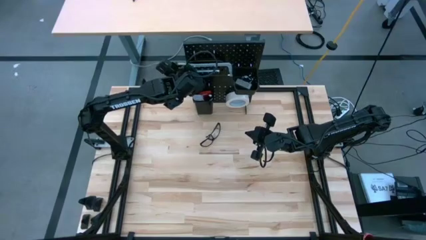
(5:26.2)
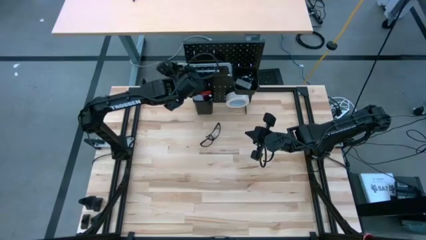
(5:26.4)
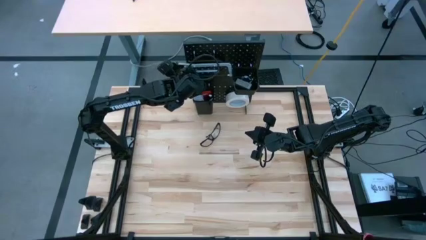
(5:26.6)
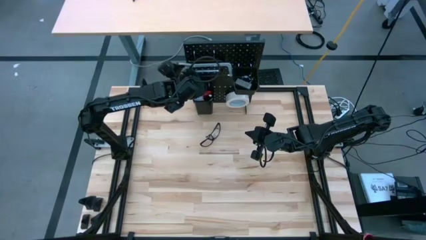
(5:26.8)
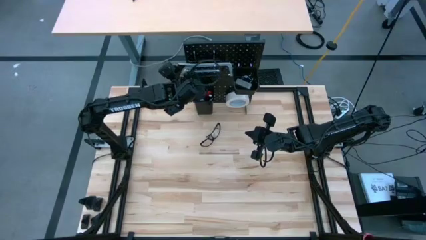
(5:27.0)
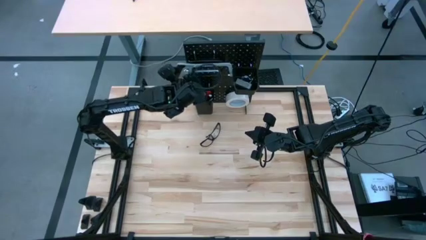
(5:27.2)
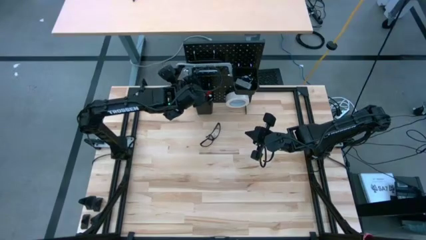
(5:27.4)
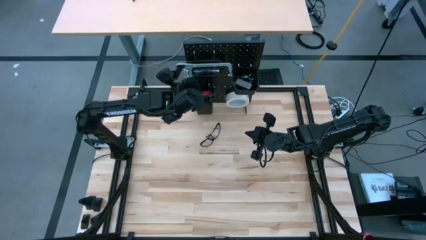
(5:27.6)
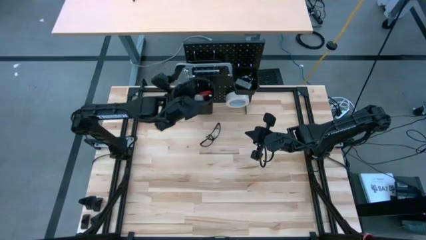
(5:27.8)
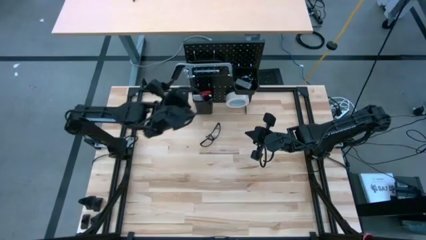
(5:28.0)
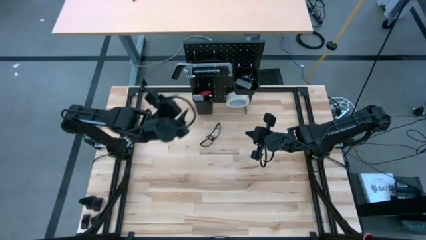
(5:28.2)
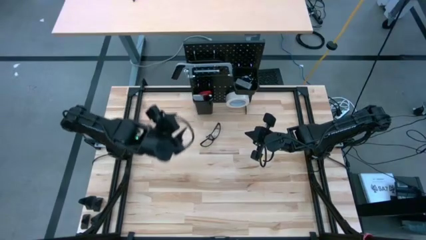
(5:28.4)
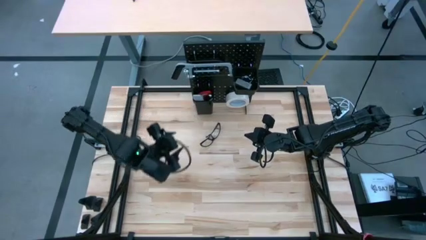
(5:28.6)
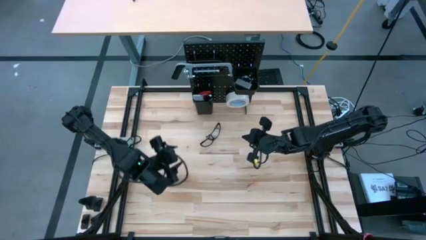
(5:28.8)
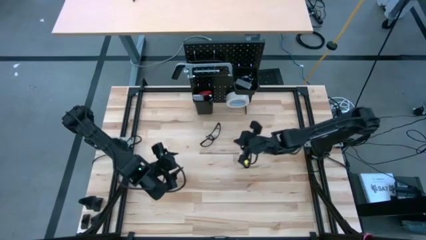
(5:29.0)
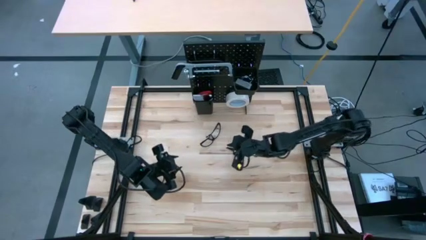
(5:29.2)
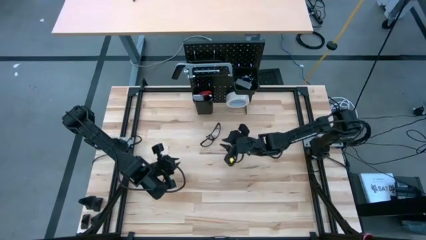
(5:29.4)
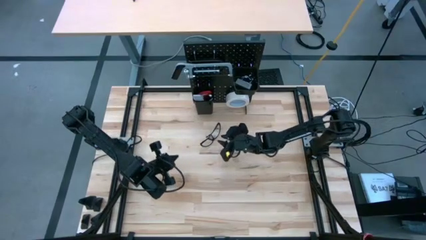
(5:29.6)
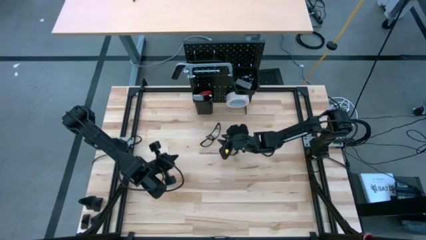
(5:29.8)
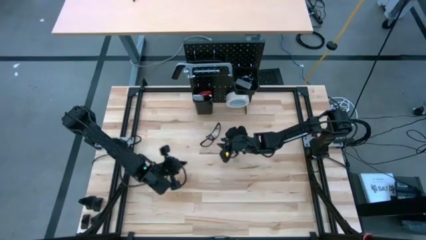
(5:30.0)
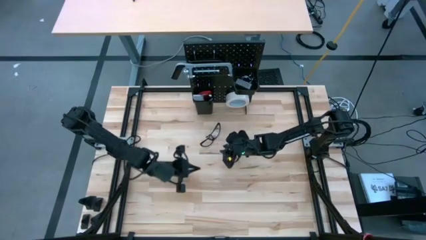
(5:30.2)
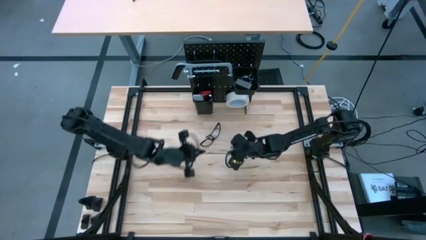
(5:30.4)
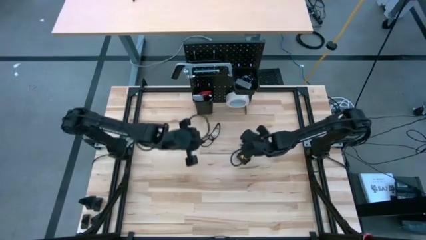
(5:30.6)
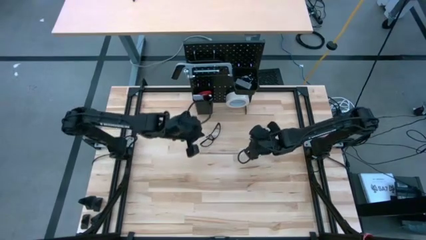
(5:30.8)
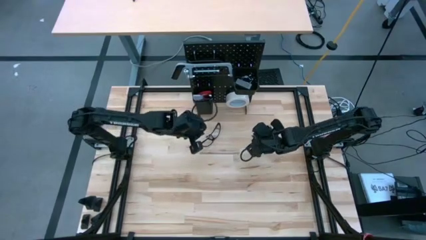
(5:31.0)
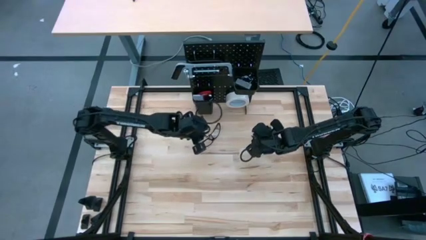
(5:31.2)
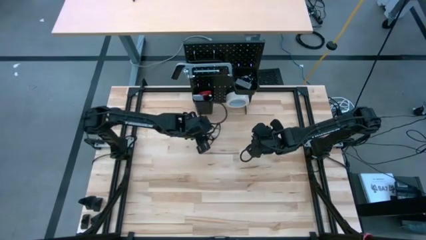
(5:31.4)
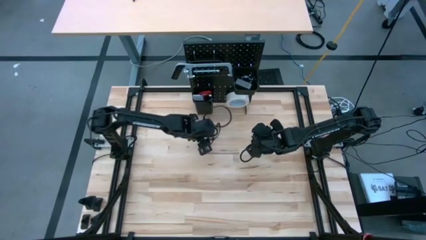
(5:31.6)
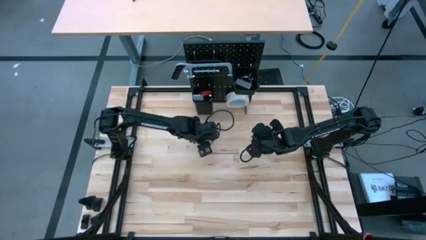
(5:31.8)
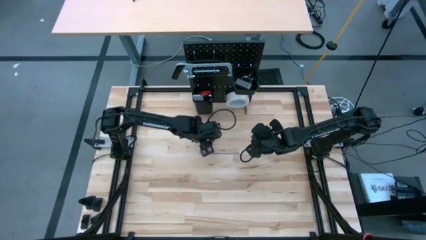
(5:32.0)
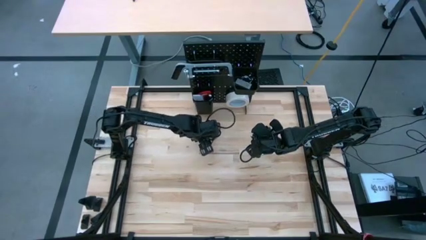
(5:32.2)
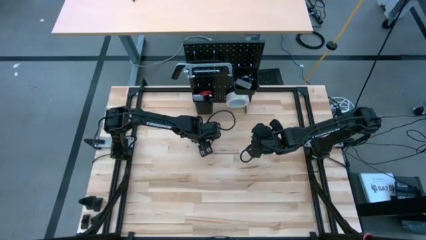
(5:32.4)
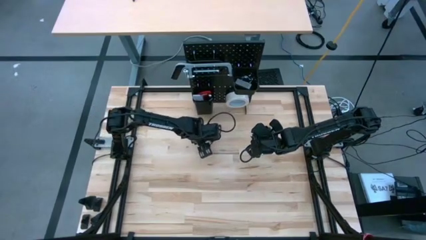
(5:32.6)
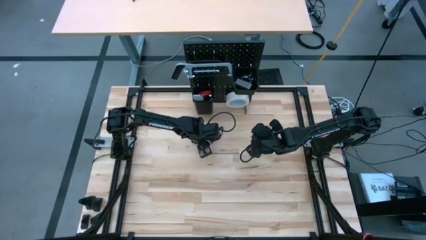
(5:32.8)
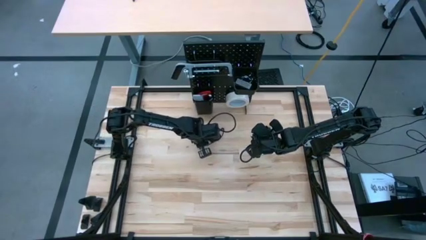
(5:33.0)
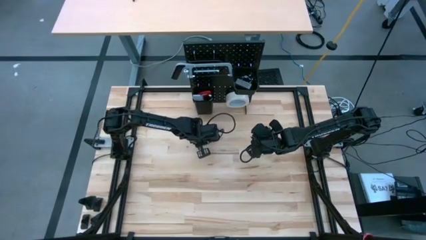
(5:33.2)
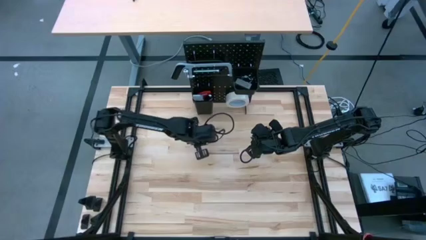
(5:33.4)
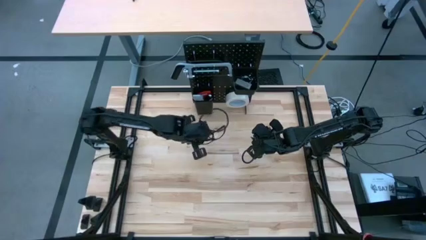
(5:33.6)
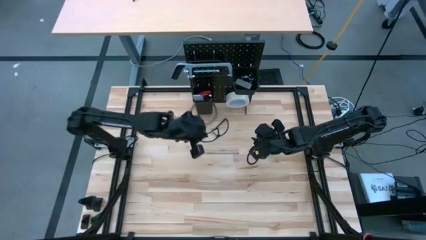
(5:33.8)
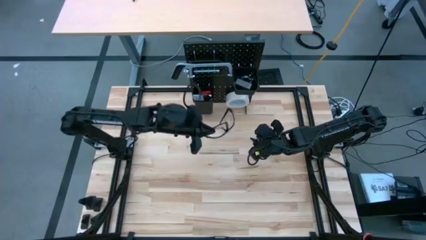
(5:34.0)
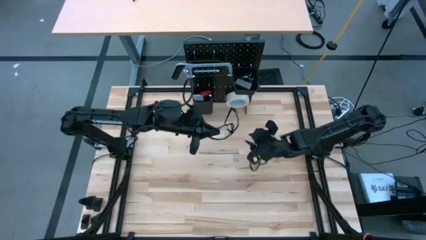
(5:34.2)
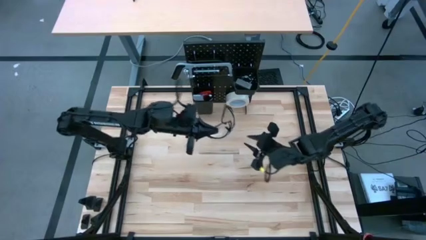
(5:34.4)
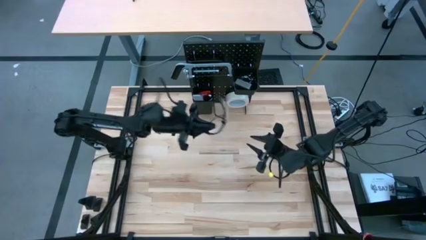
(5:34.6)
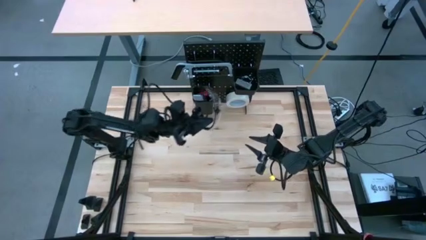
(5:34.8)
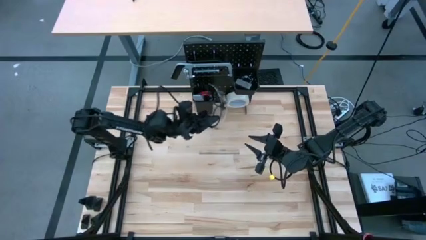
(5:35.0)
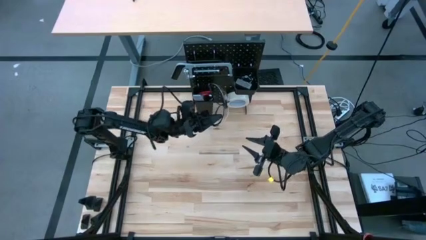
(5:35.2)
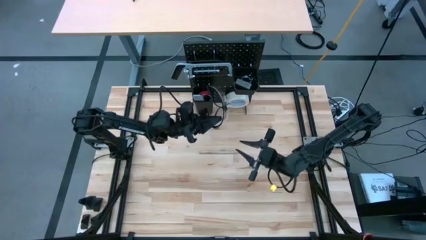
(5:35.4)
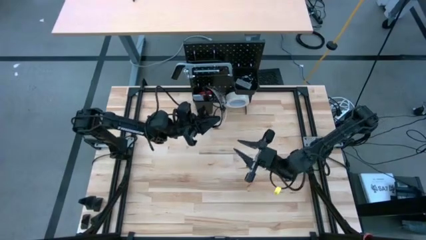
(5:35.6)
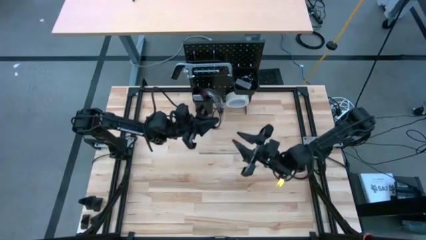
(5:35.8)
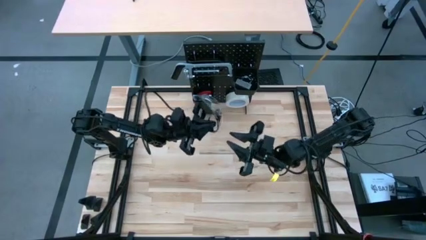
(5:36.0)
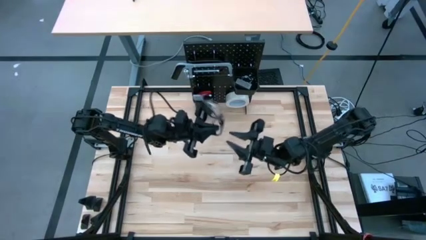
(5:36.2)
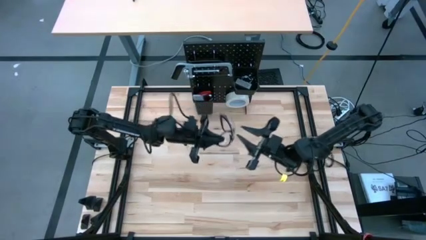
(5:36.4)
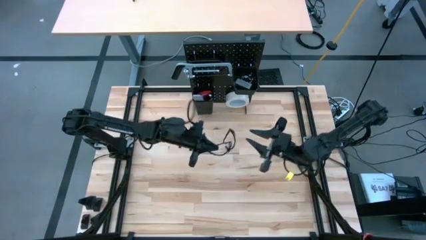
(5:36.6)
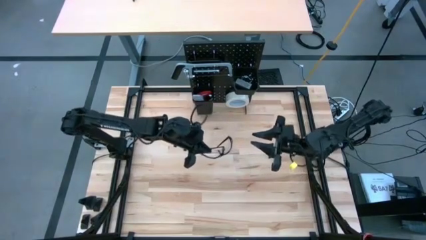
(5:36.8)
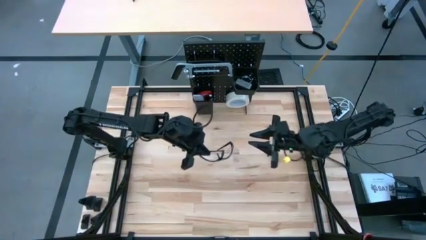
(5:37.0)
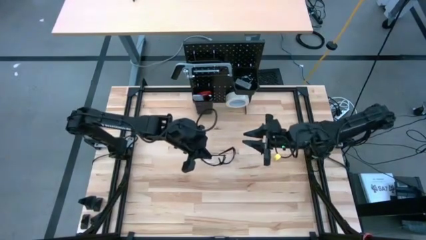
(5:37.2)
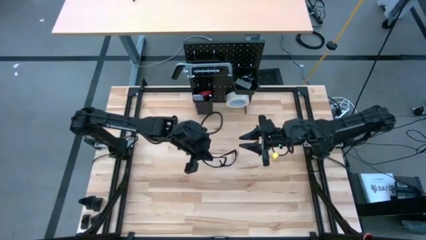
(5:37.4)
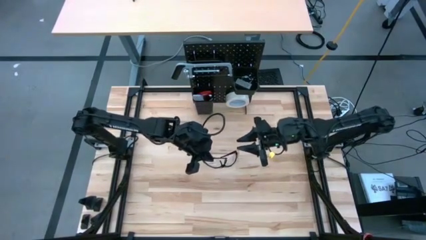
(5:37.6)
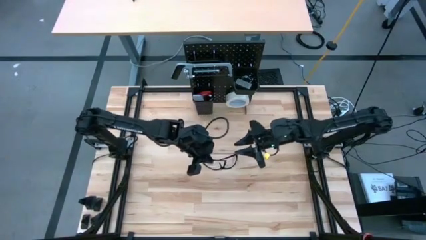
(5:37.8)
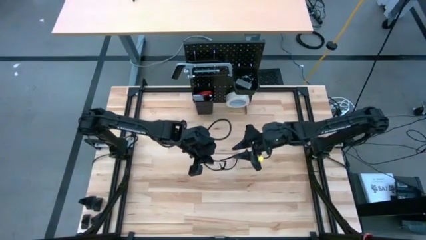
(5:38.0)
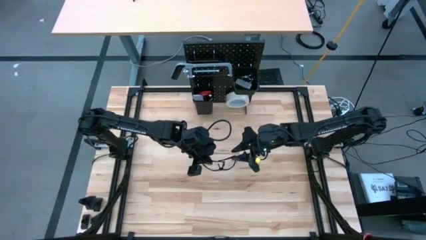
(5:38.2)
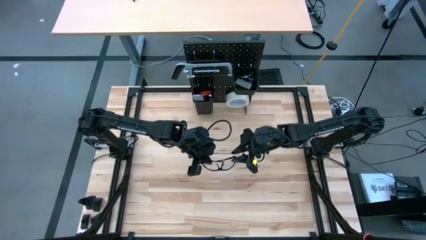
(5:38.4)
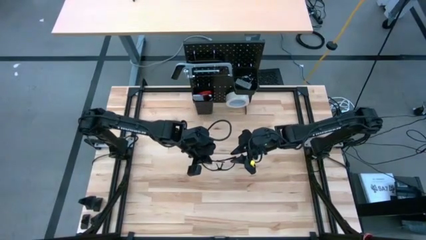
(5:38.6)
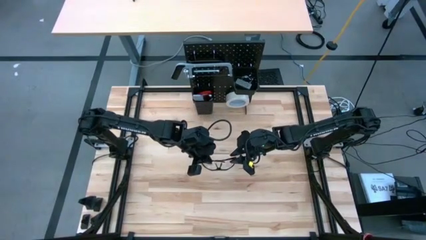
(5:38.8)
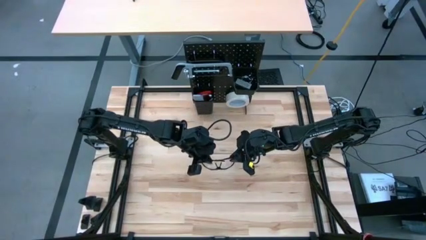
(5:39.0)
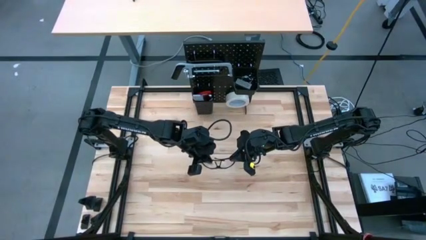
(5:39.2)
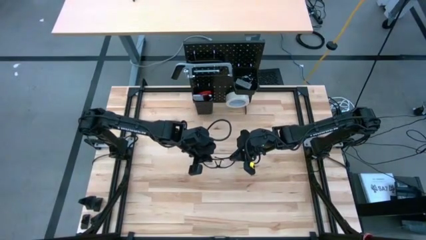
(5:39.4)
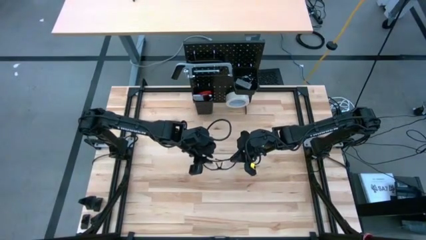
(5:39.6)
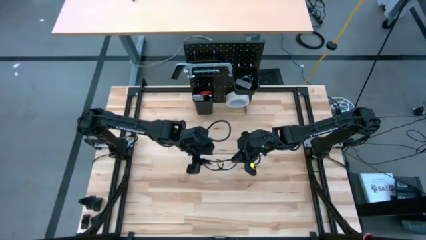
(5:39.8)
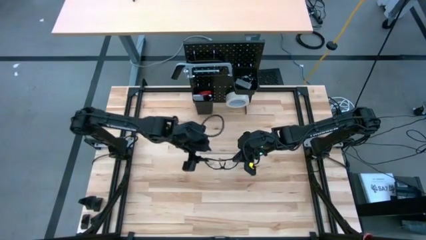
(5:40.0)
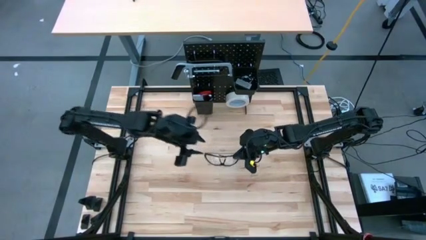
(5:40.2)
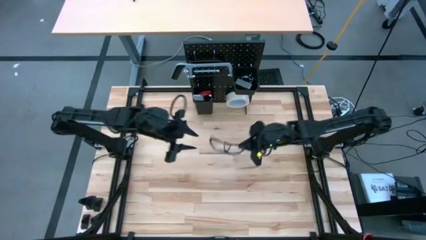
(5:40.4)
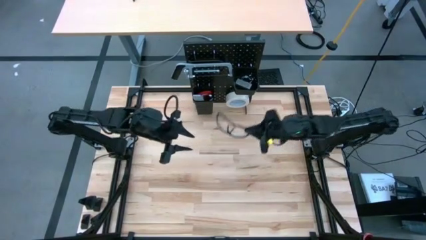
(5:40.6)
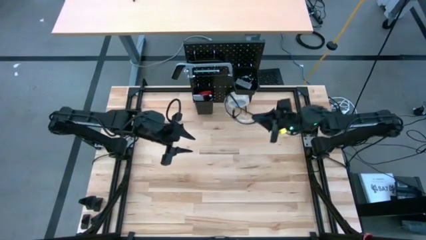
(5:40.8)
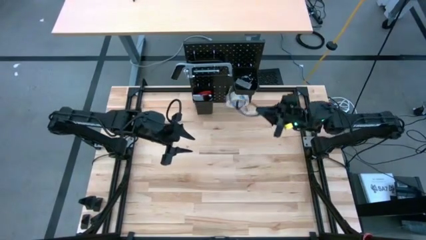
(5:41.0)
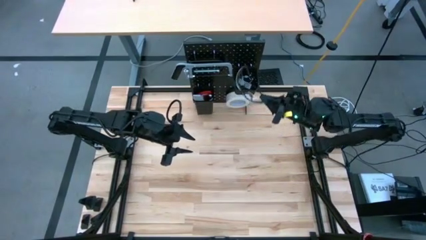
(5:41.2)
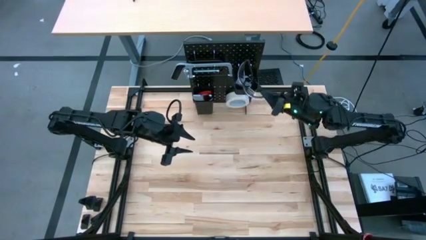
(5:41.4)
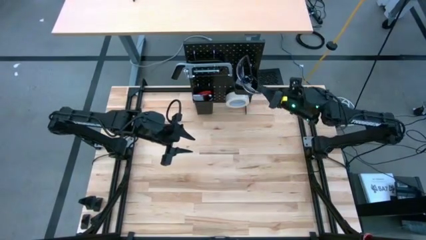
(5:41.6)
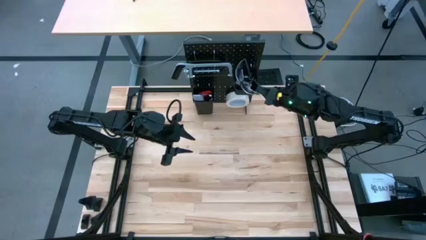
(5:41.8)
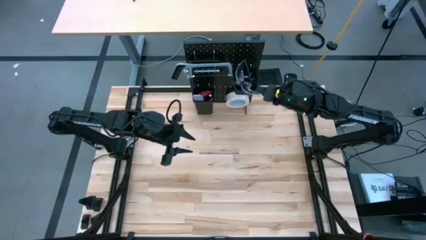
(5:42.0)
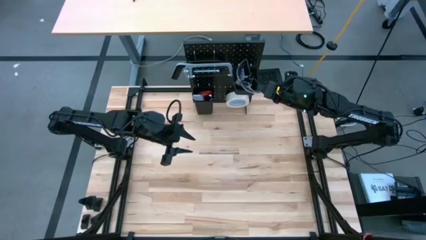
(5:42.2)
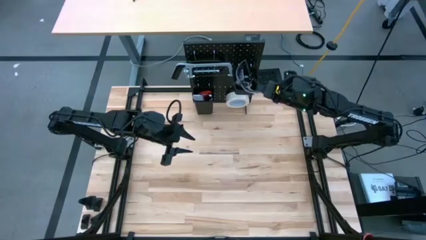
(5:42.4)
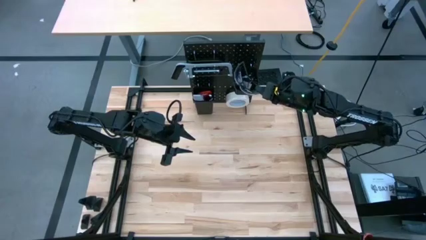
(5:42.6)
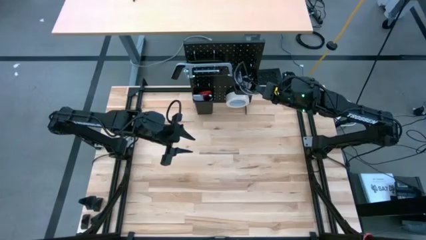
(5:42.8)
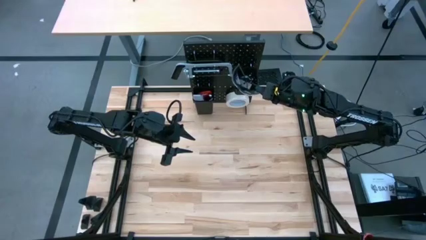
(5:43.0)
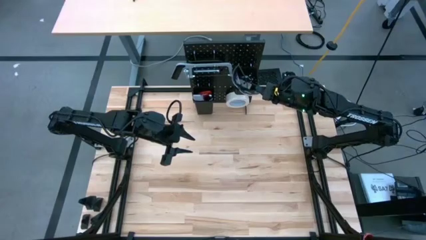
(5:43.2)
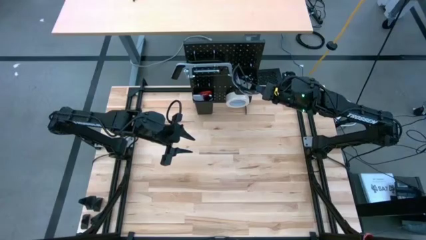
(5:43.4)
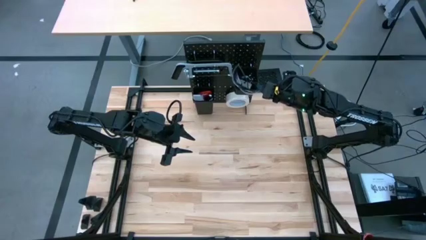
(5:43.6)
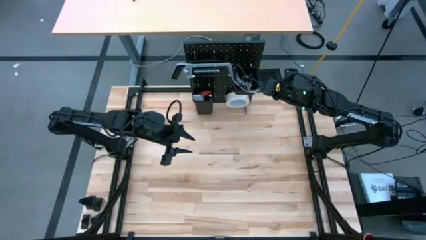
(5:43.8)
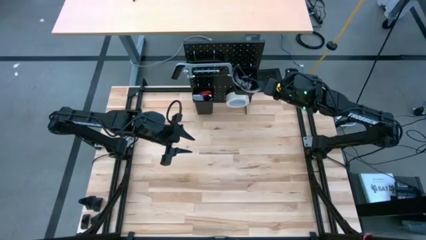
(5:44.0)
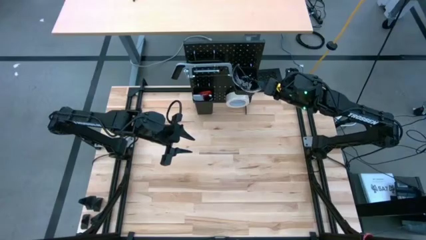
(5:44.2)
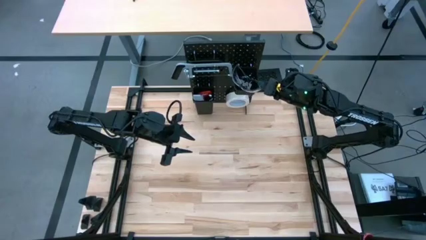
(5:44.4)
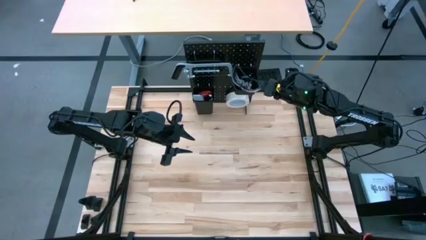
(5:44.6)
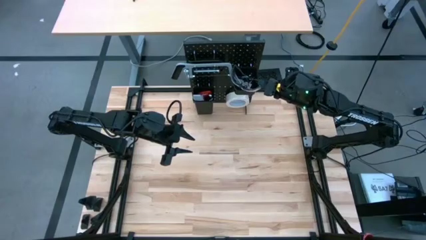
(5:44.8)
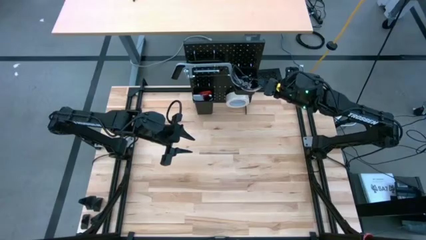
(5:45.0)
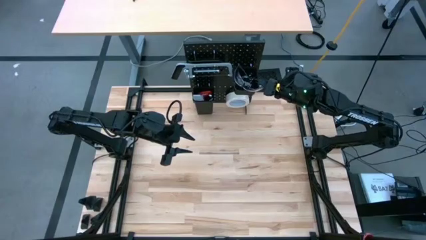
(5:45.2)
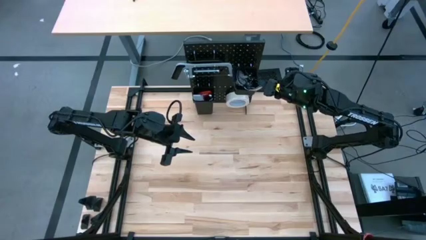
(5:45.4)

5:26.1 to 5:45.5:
Task: Hang tools onto peg board
Put the black safety glasses into the right black tool bin
